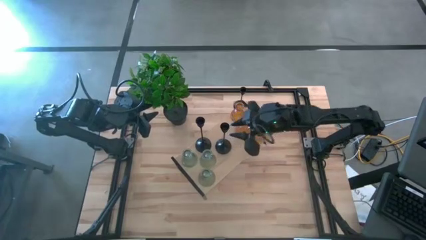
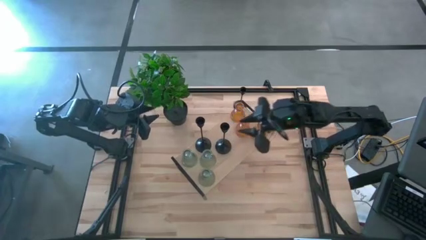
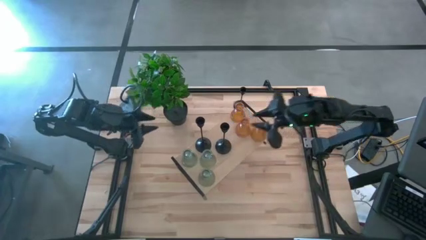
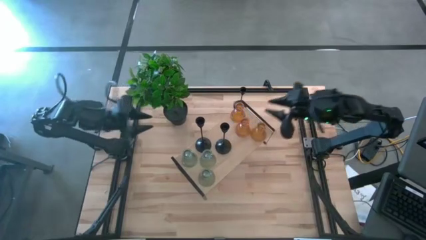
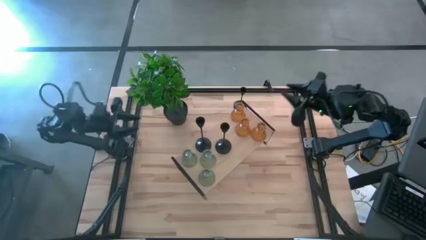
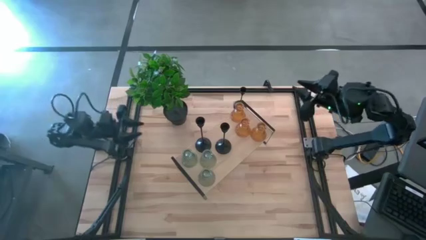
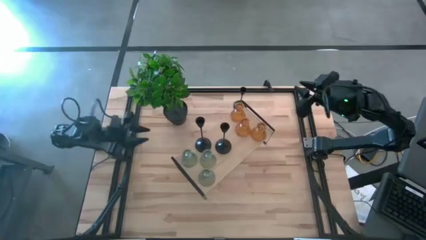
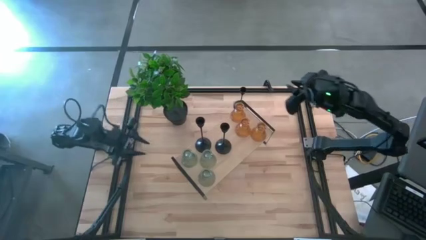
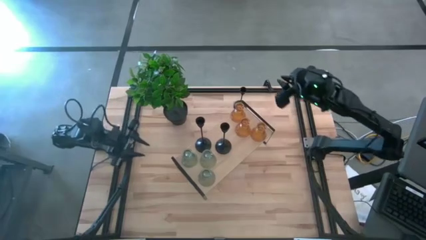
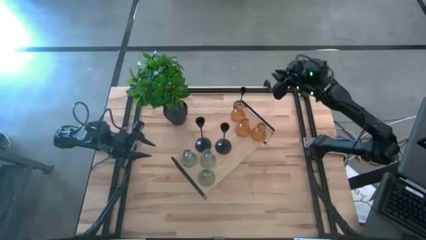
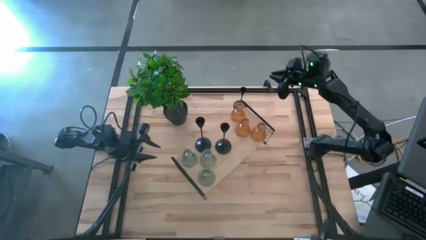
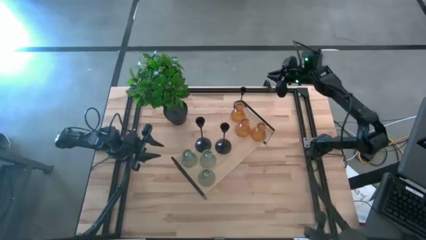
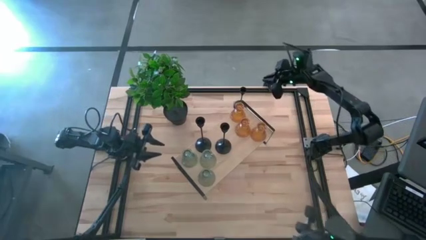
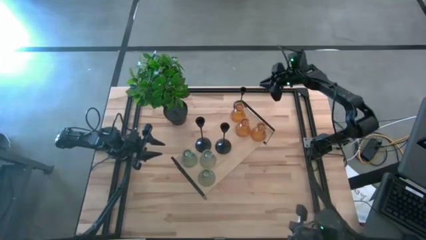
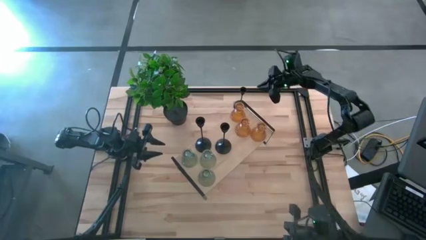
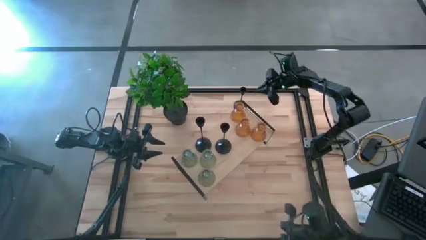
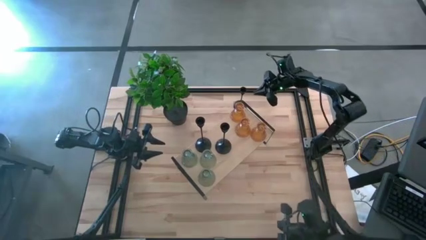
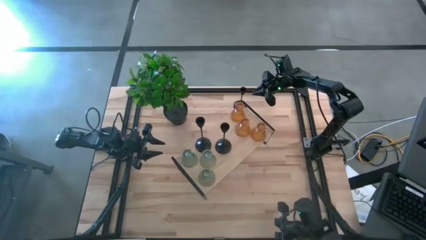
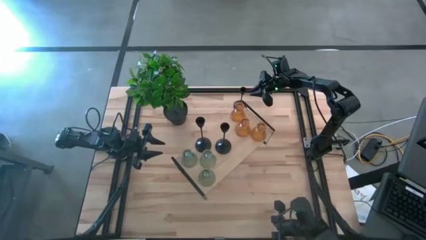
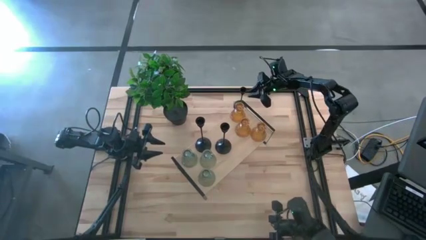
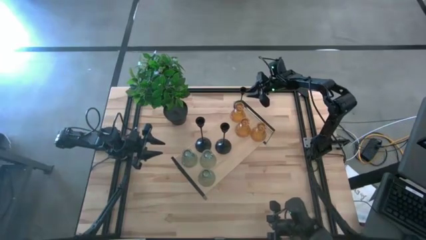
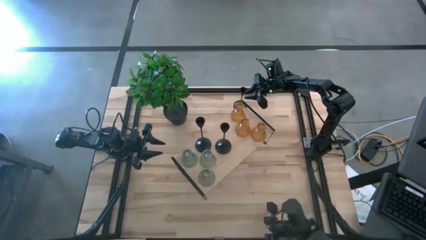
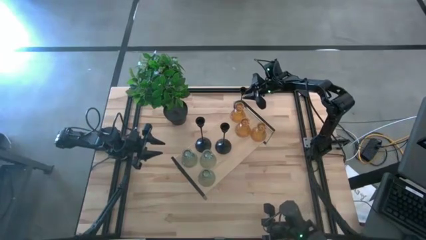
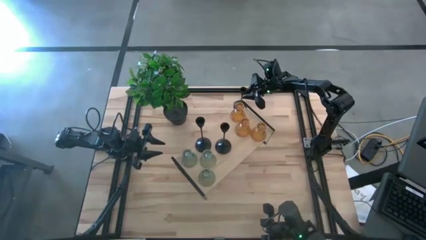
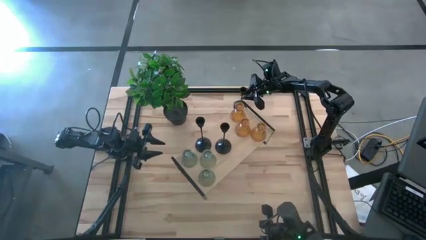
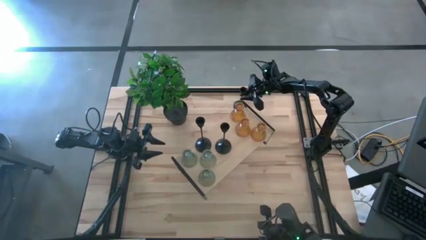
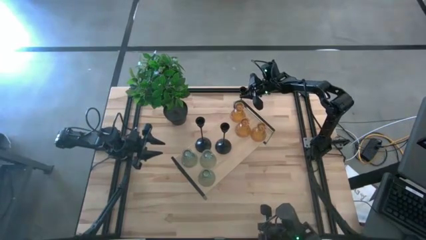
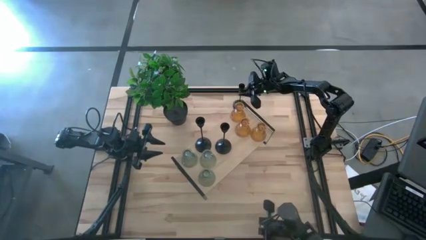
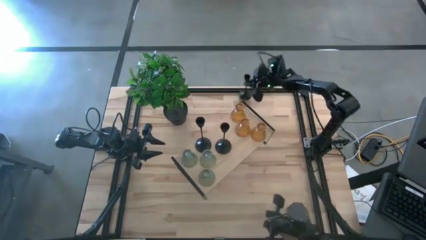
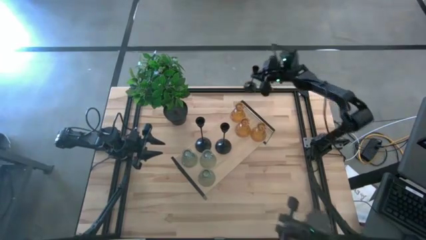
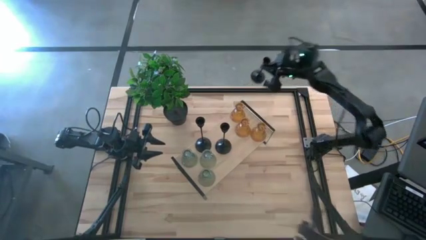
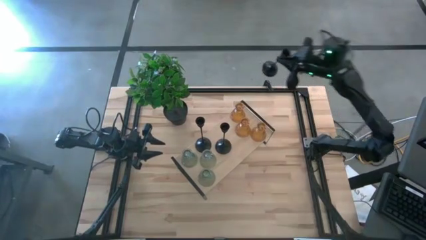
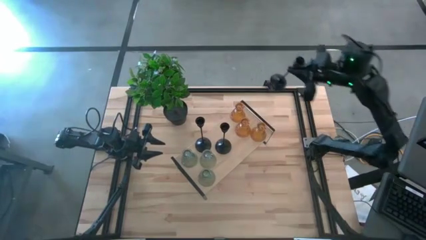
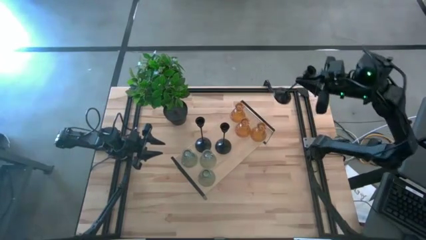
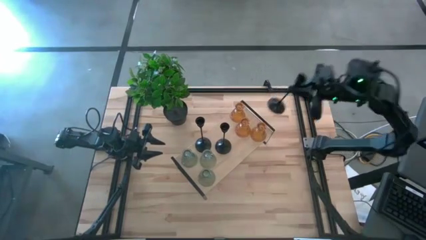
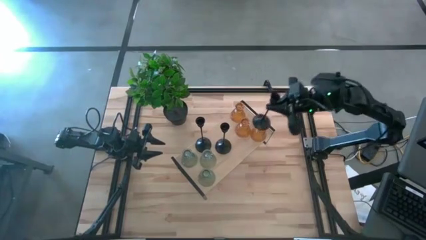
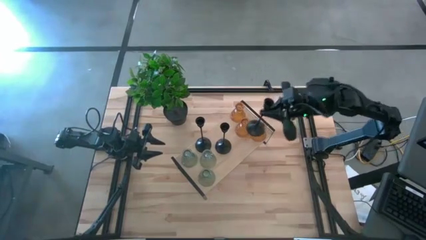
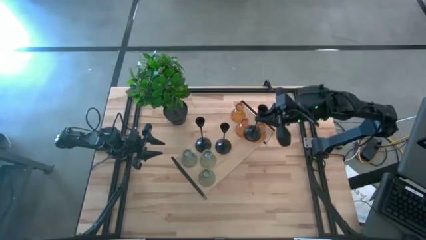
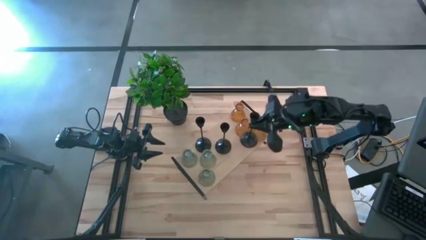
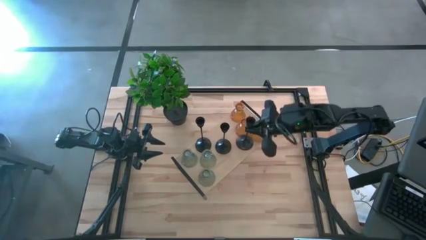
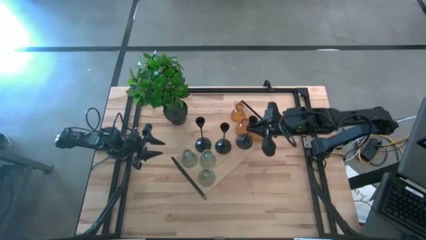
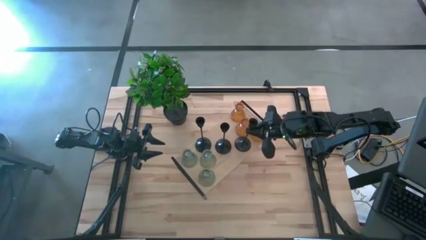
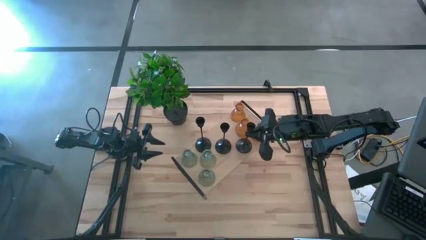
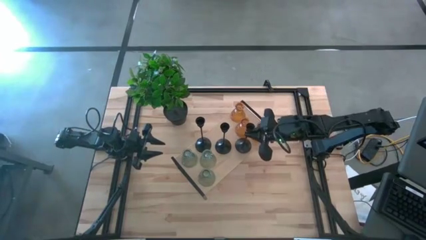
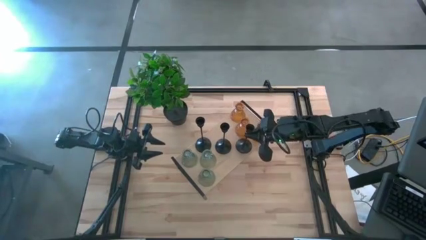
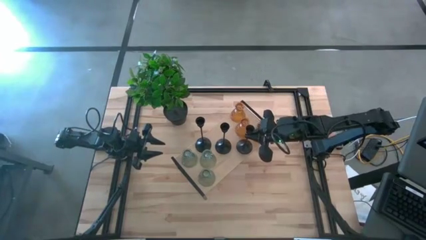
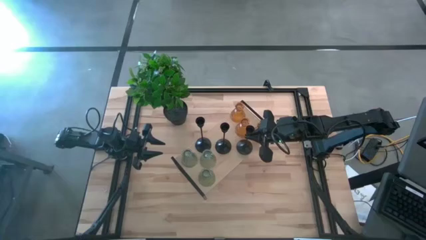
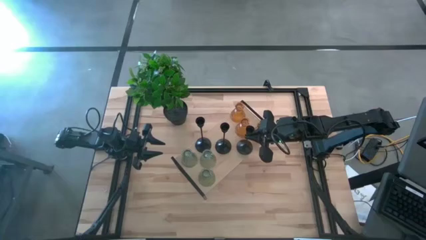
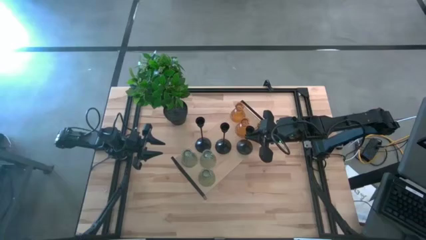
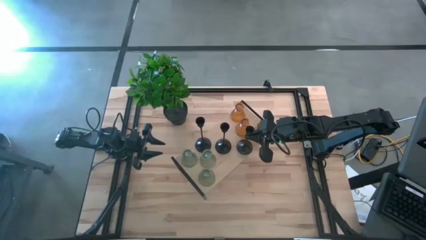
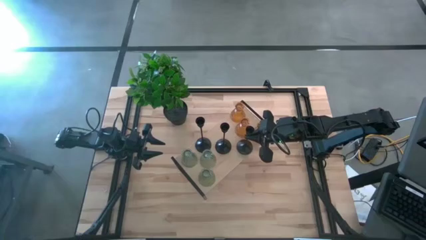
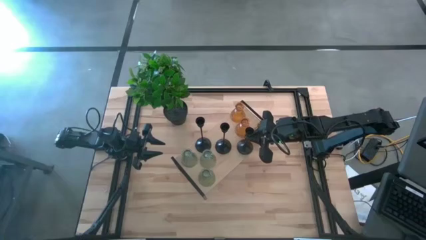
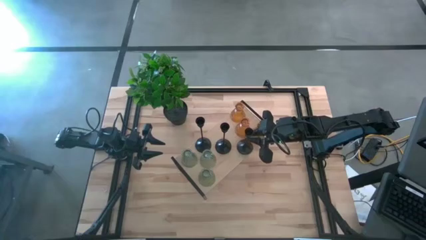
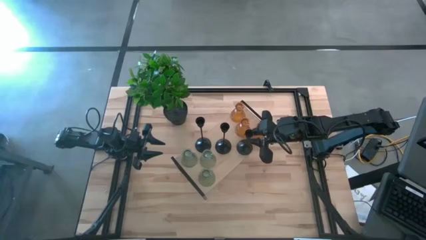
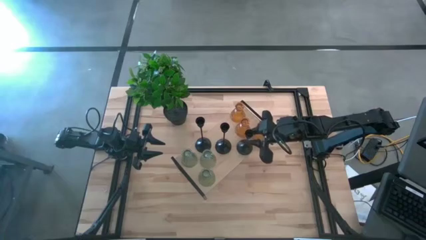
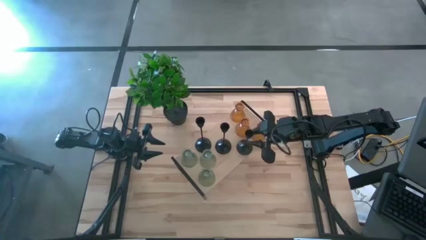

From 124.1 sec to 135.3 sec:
Task: Pick & Place candle stick holders
Put the black candle holder on the shelf

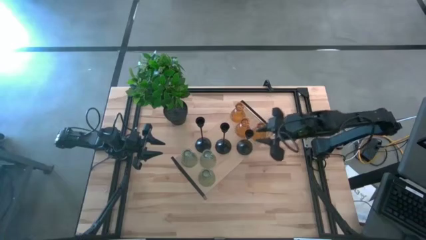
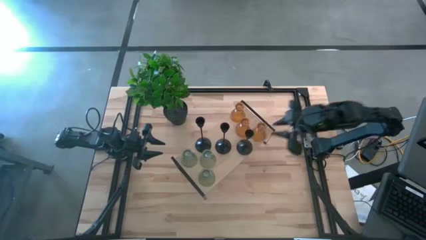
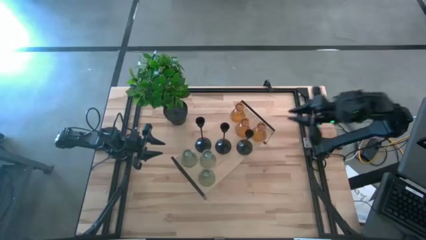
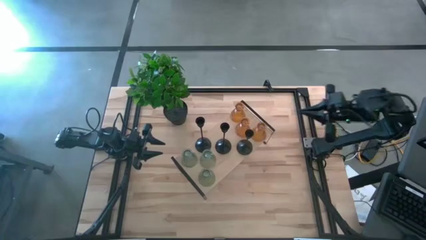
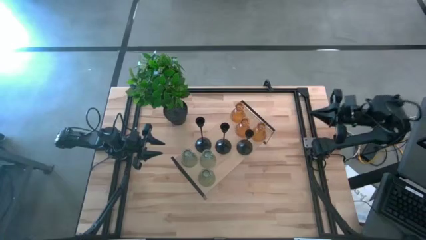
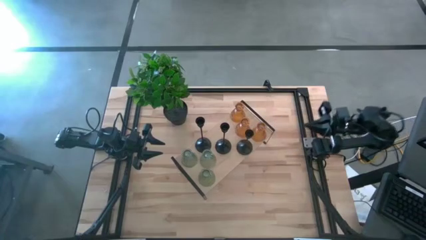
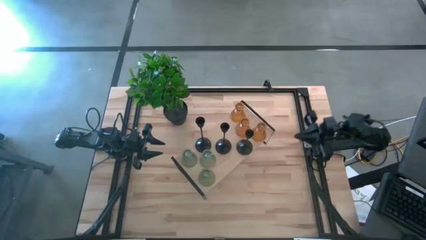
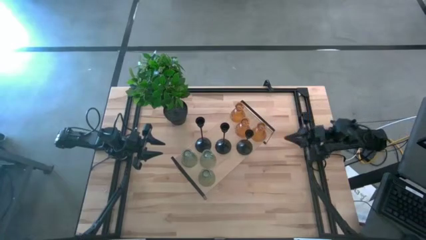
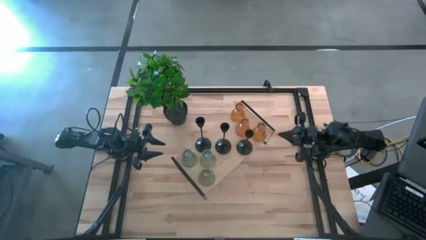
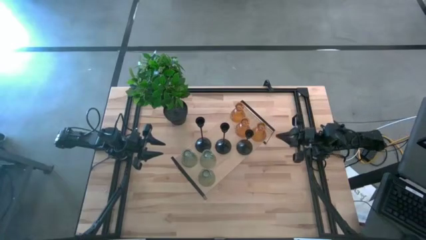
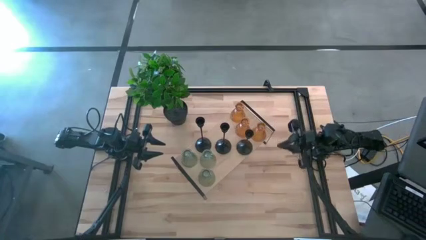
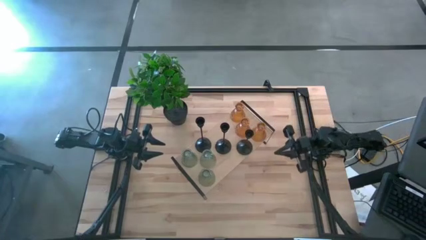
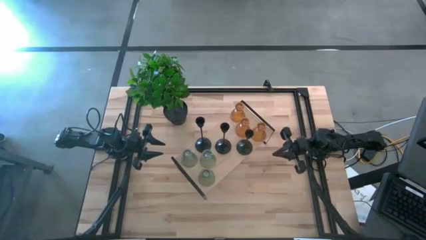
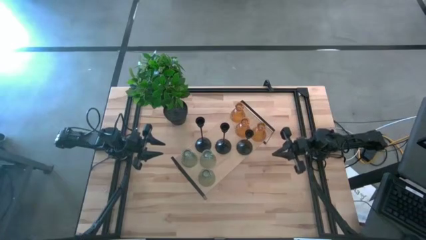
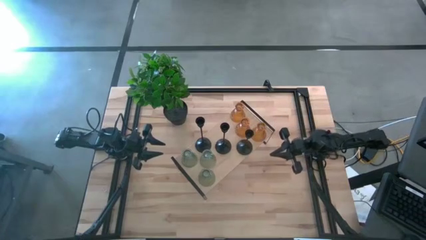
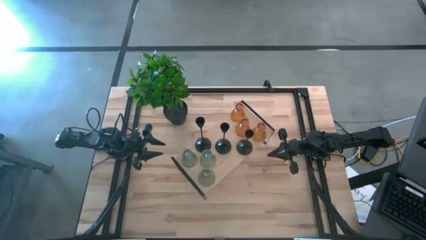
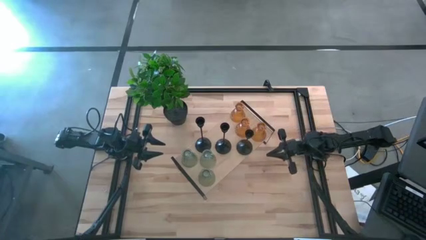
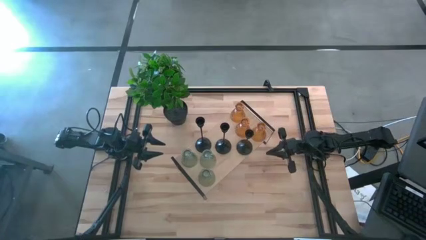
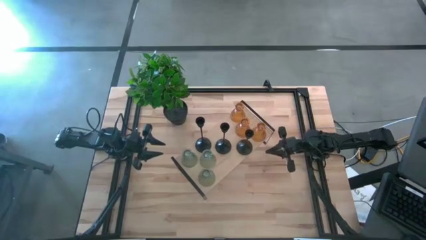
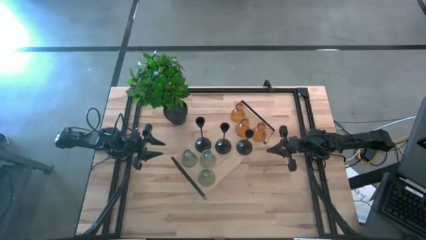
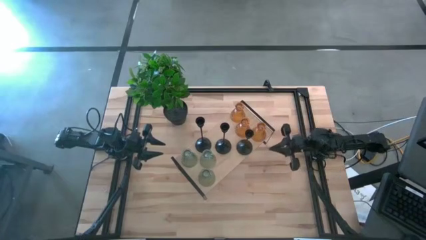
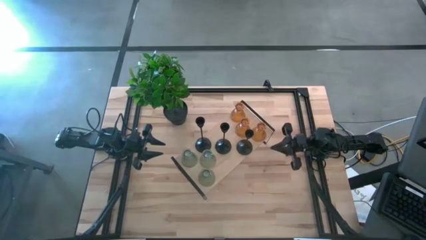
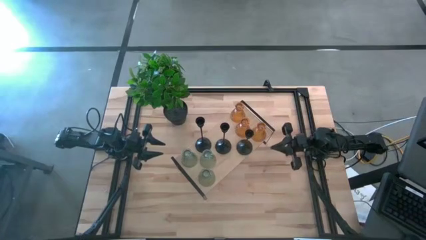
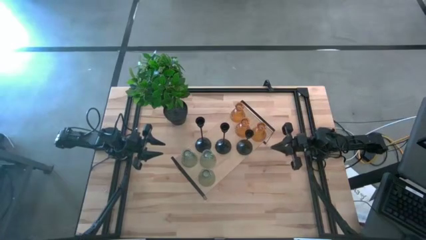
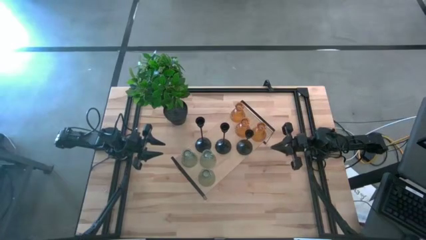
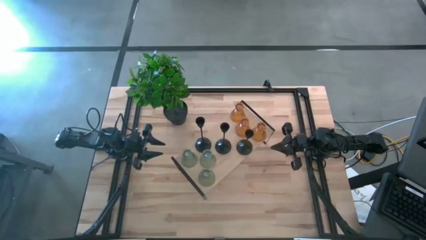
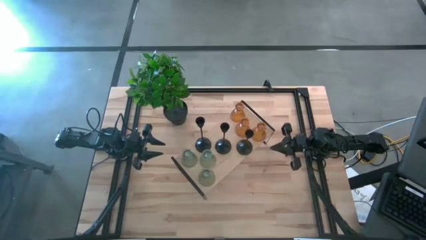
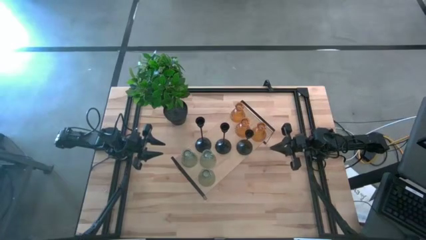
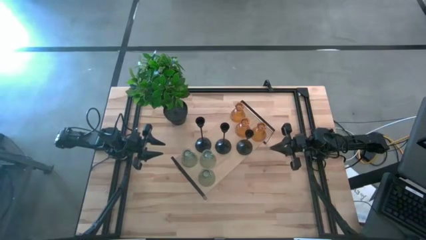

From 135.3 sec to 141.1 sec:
Return to Home Position
